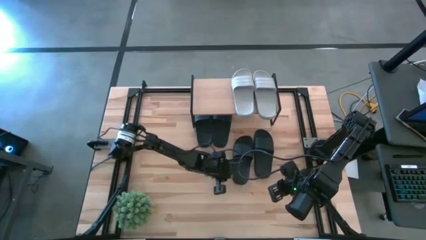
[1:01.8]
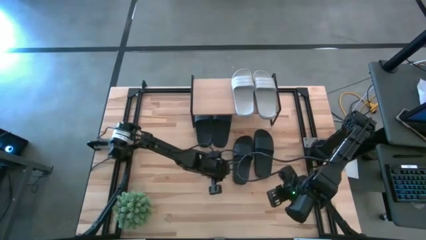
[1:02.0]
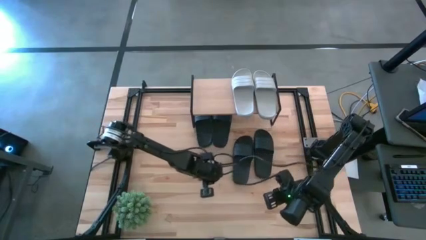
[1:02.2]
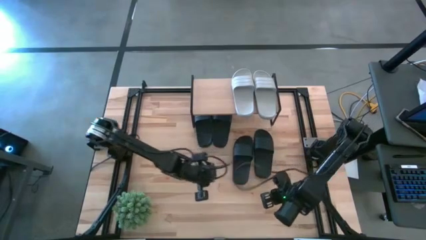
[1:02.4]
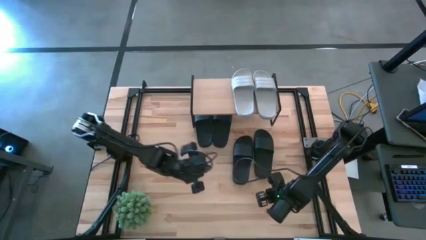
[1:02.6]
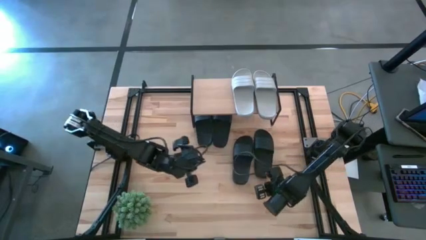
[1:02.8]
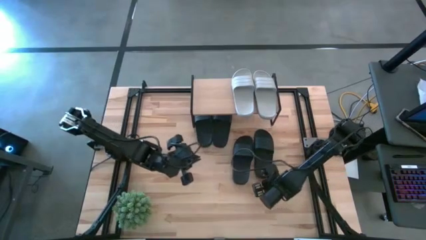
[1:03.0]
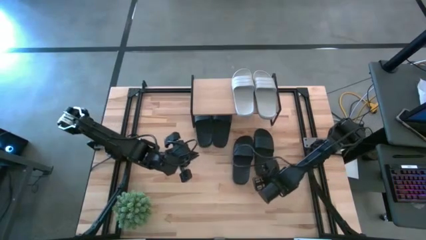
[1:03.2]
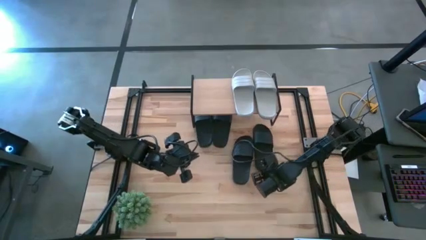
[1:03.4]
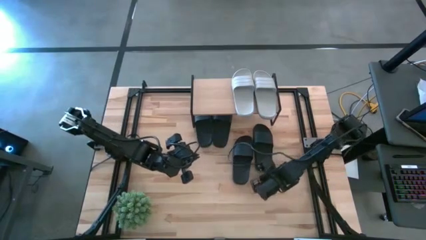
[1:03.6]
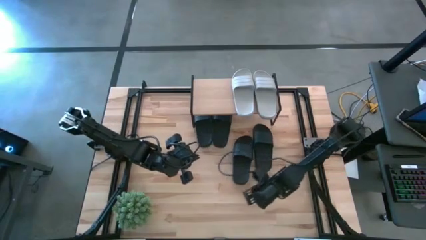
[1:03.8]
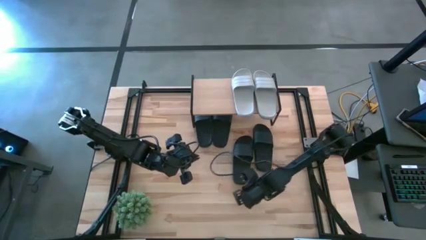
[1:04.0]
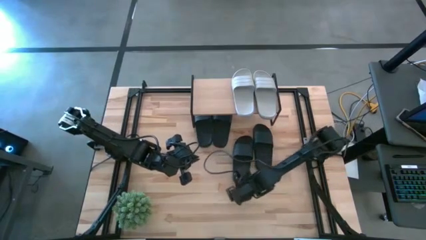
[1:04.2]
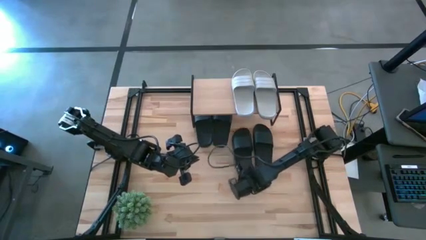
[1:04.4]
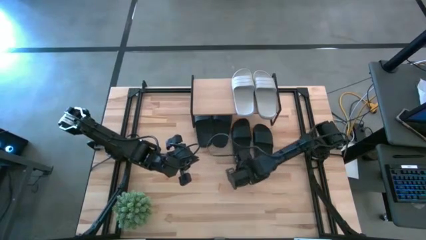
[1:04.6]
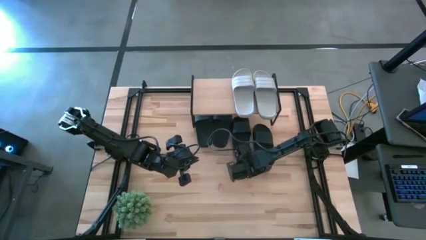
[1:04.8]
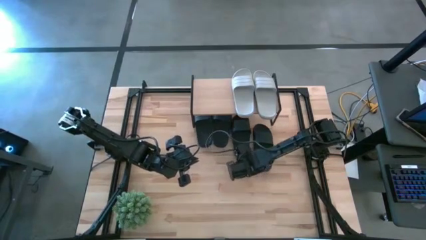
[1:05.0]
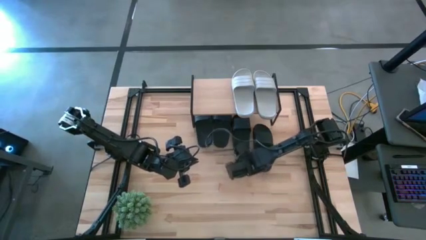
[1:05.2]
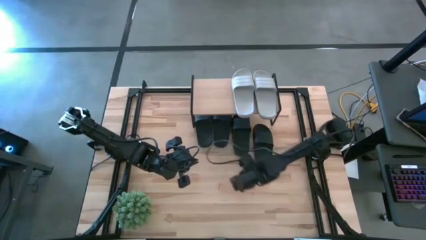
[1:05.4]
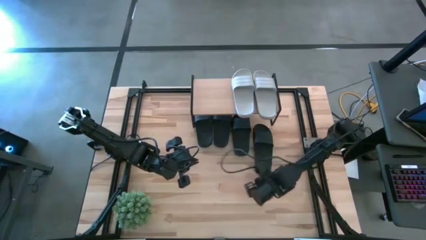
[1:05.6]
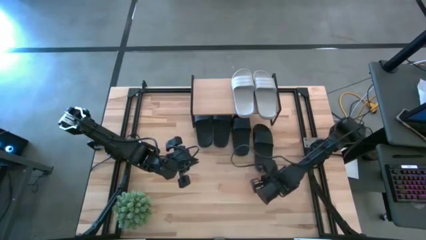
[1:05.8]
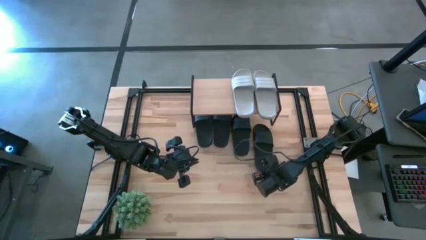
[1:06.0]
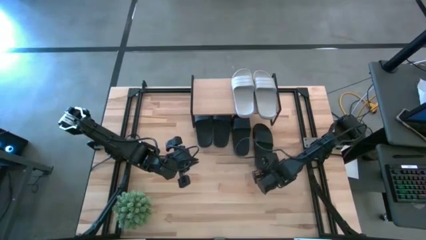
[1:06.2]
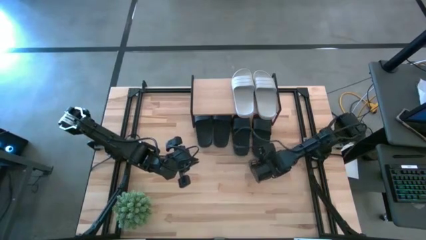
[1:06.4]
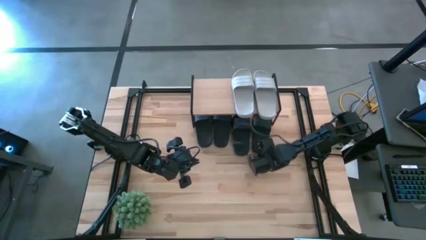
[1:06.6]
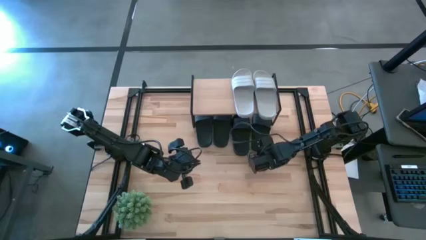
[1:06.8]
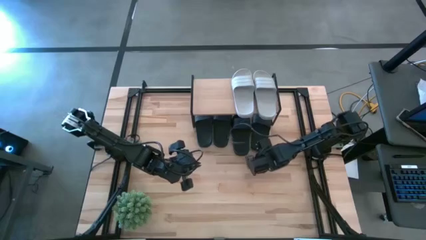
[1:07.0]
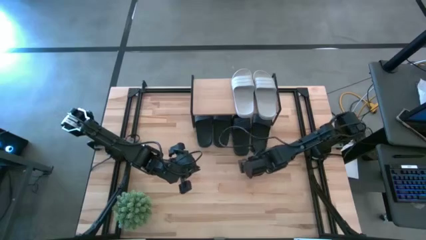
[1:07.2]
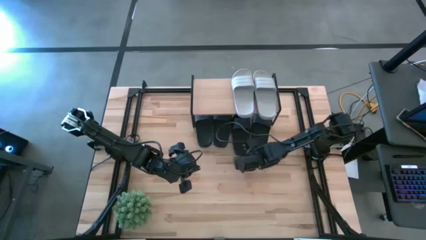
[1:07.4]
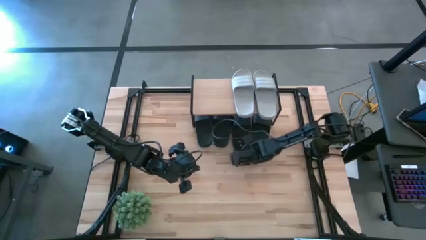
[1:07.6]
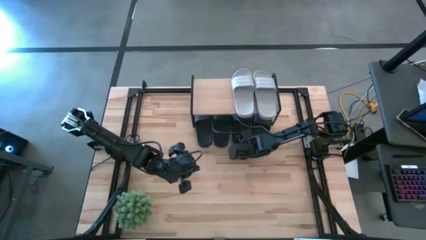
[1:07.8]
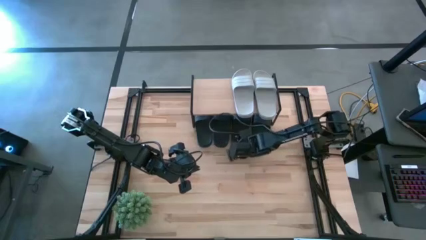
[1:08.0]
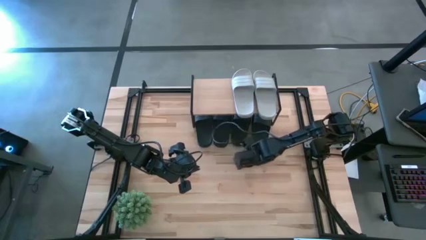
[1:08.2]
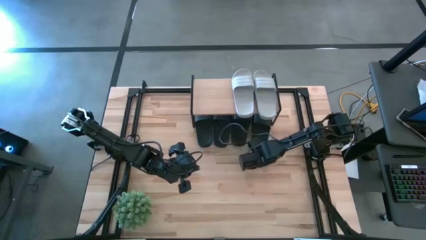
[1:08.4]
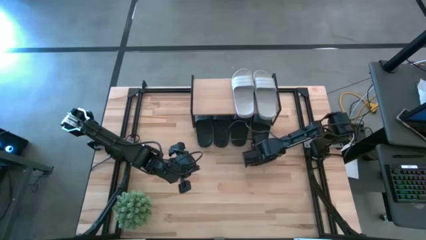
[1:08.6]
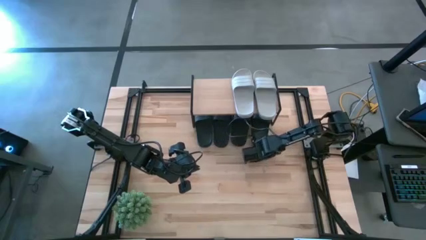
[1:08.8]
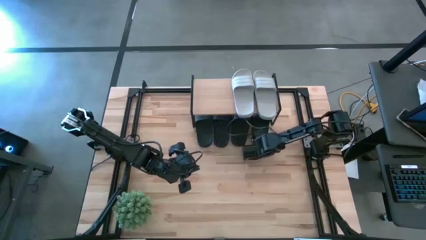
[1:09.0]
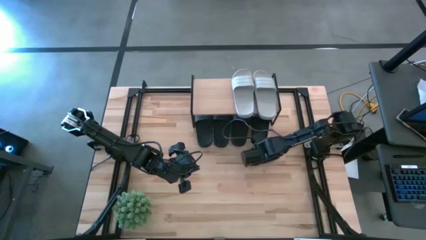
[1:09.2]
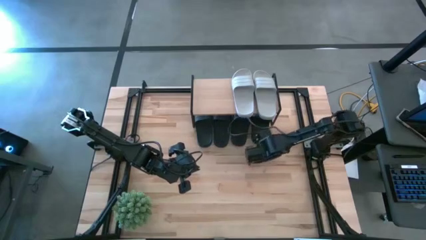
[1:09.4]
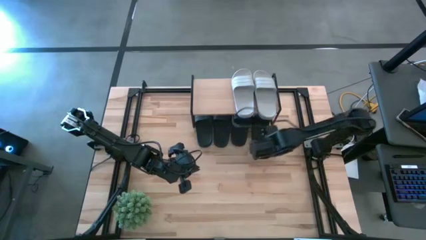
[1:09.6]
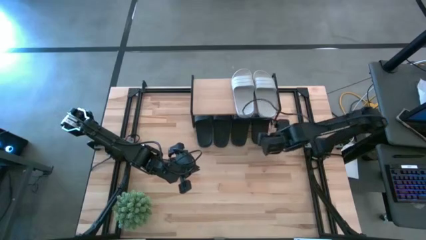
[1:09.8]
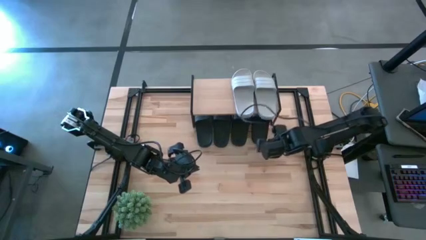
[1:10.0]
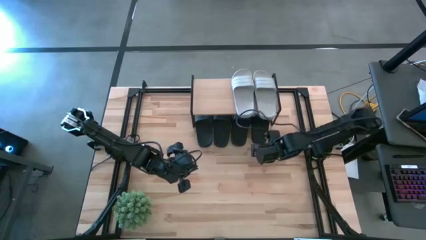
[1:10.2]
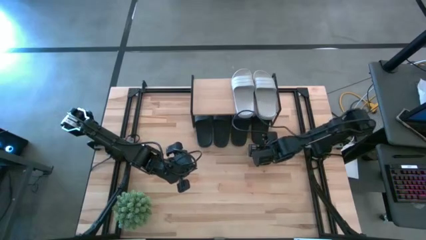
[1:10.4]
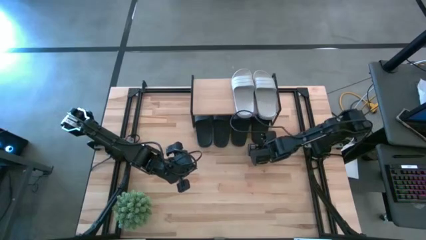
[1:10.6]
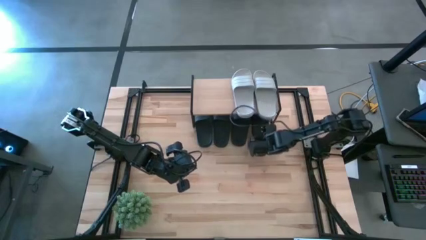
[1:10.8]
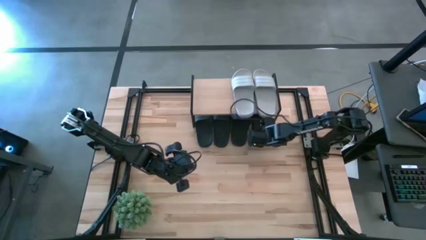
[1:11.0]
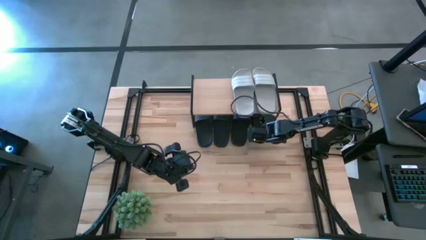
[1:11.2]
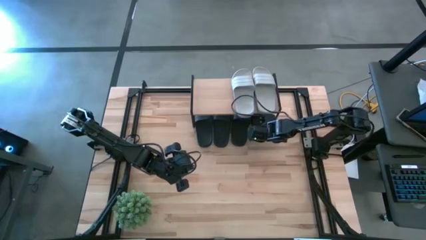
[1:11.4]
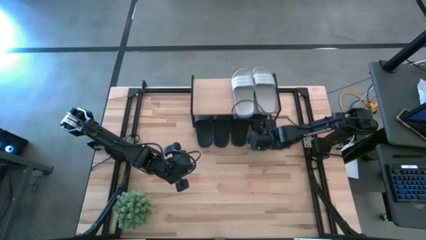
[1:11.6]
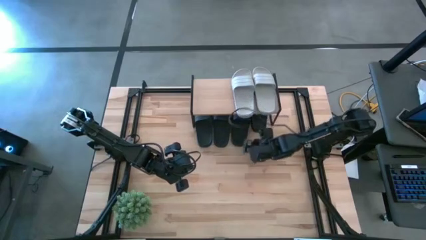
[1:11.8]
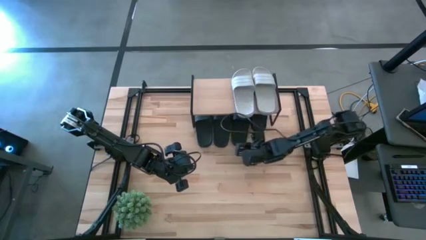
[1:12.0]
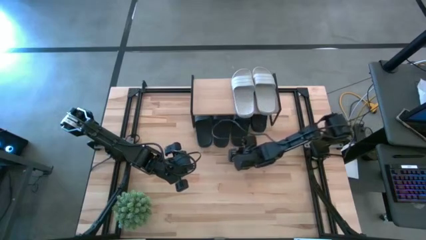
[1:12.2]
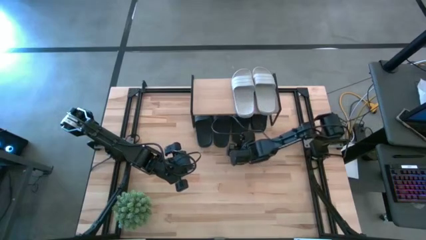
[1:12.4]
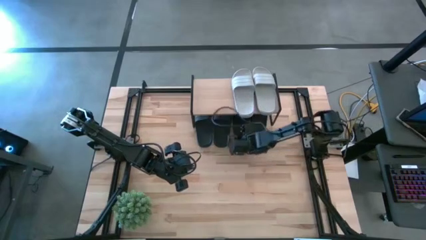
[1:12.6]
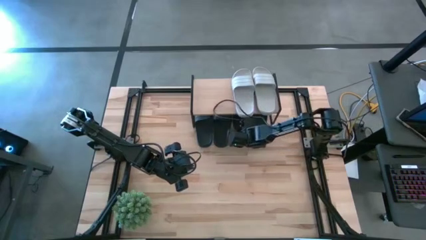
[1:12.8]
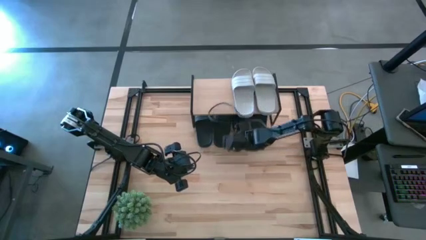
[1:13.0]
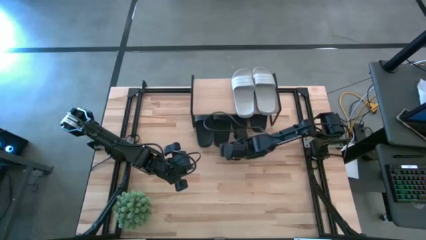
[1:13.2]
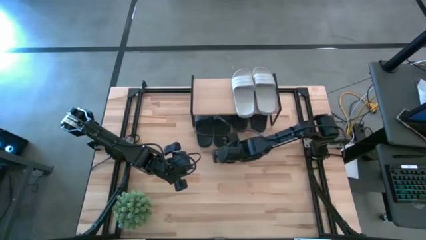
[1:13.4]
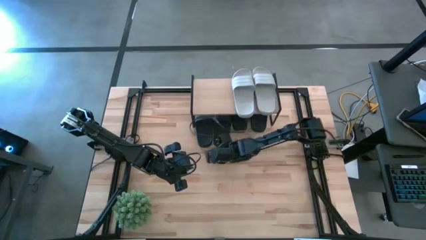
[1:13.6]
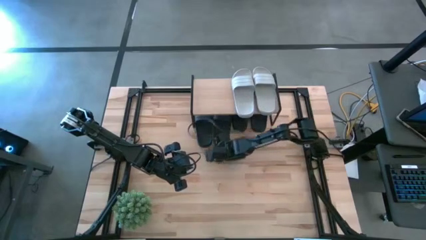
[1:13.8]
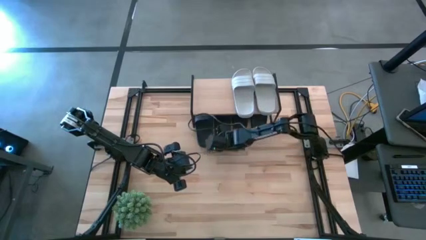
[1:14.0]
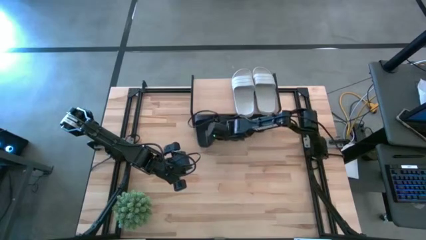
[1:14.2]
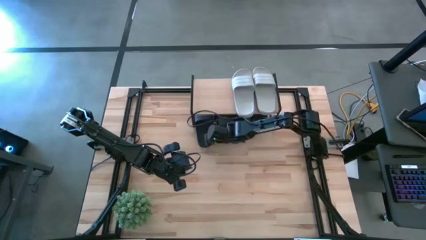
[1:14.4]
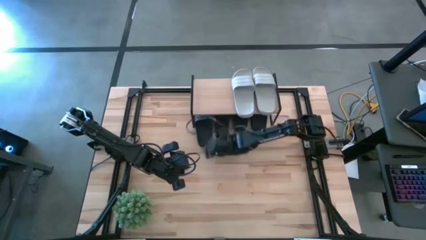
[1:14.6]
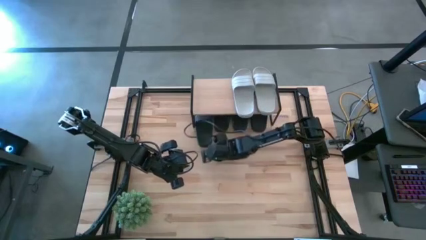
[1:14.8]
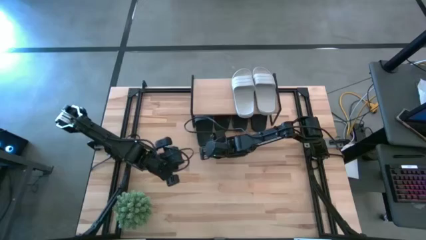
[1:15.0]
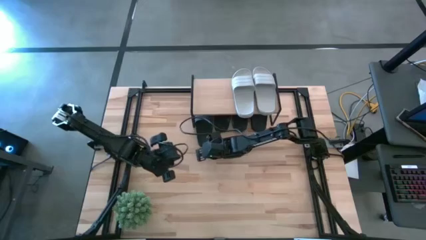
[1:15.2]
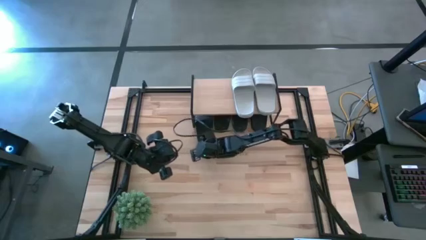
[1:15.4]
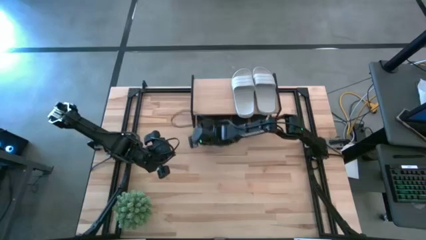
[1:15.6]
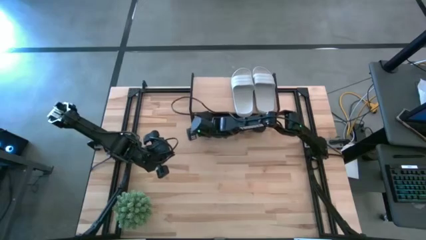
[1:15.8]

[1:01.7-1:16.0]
Task: Pick and place slides into the shelf
Adjust the black slides under the shelf
